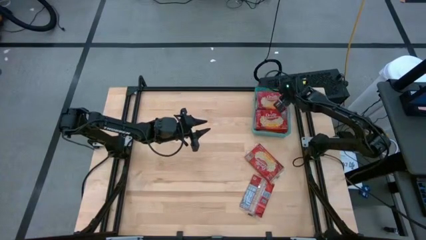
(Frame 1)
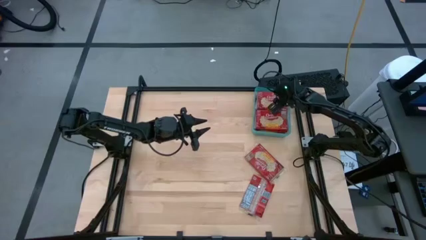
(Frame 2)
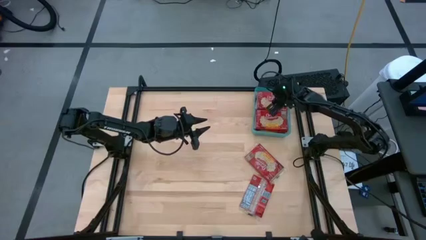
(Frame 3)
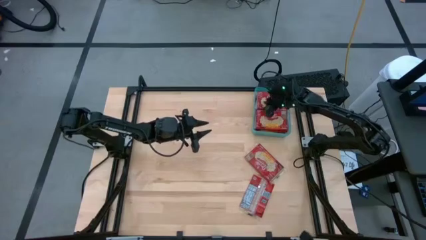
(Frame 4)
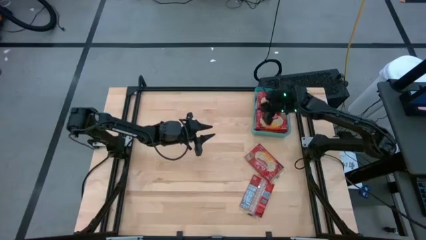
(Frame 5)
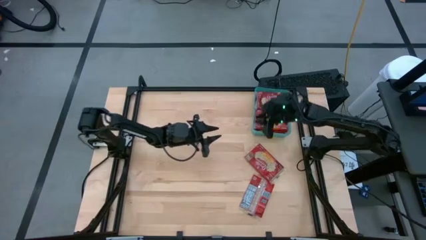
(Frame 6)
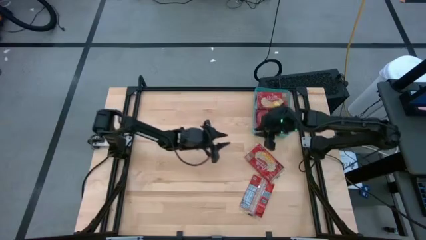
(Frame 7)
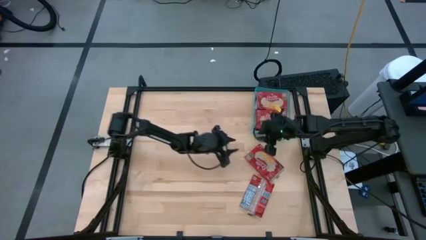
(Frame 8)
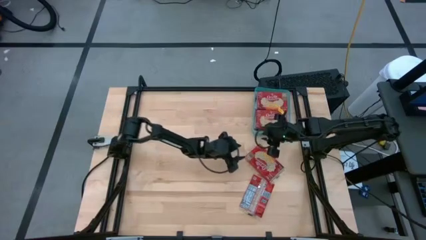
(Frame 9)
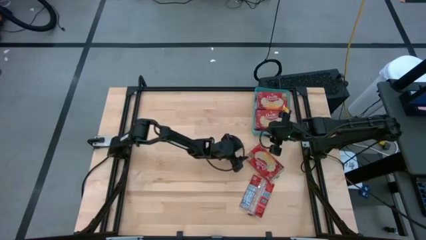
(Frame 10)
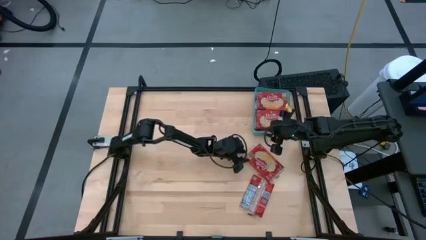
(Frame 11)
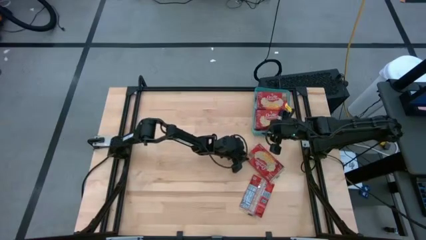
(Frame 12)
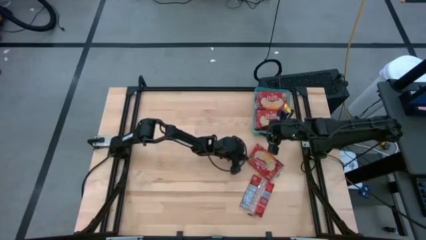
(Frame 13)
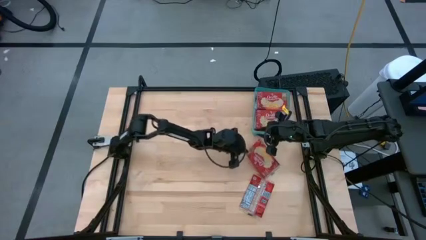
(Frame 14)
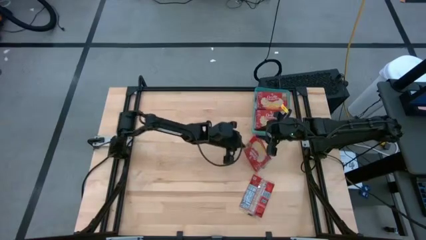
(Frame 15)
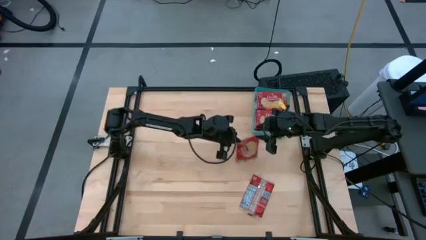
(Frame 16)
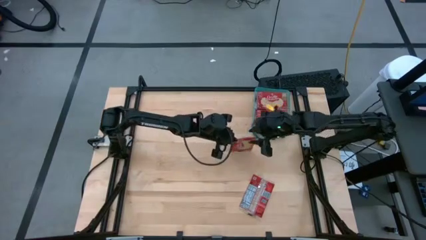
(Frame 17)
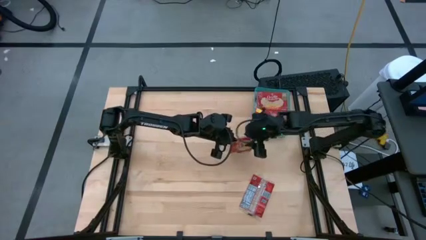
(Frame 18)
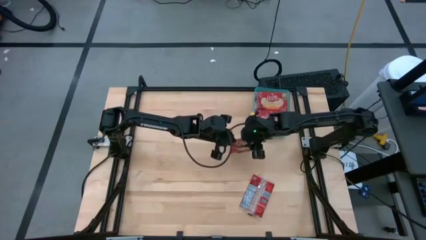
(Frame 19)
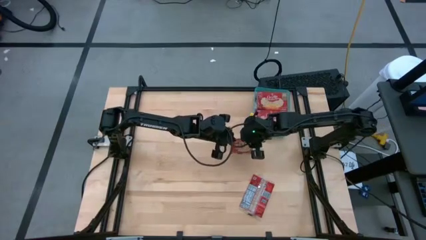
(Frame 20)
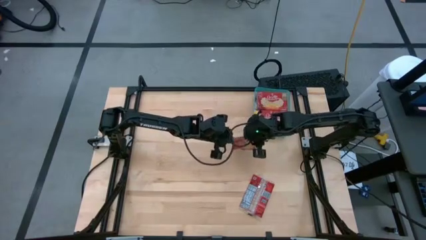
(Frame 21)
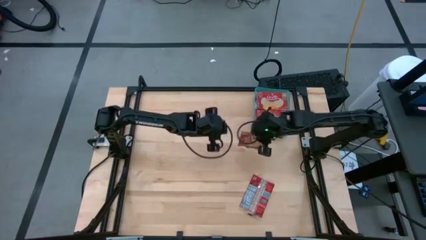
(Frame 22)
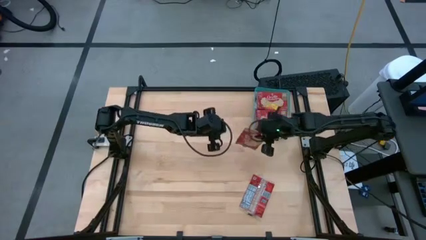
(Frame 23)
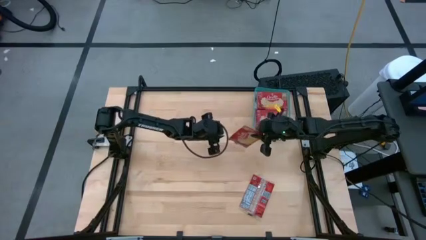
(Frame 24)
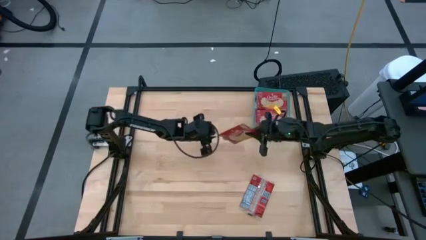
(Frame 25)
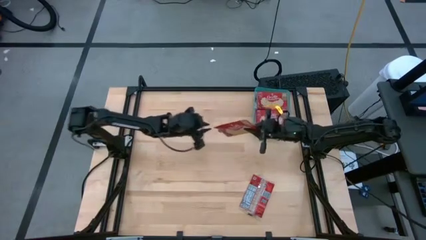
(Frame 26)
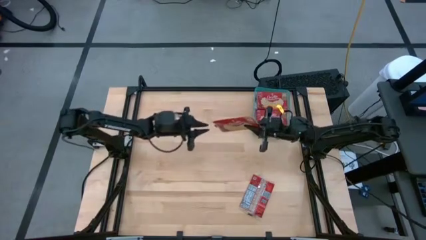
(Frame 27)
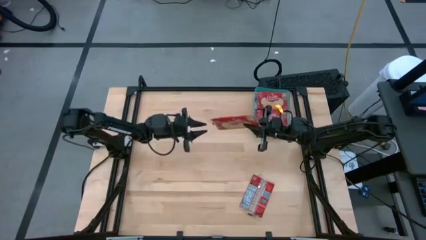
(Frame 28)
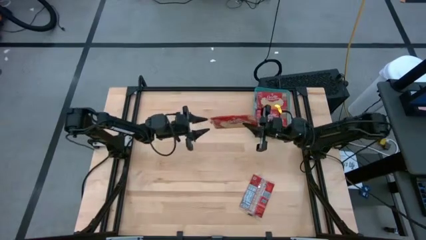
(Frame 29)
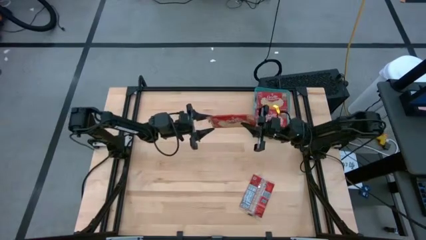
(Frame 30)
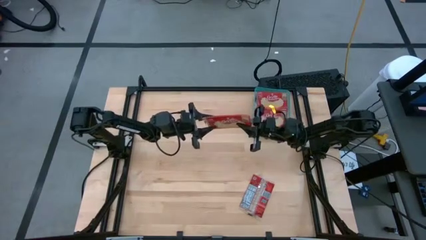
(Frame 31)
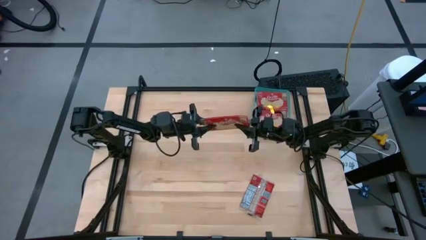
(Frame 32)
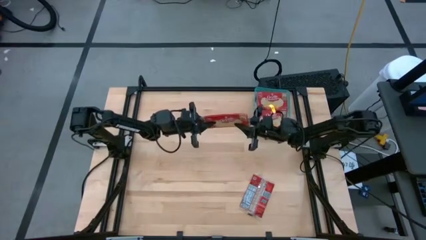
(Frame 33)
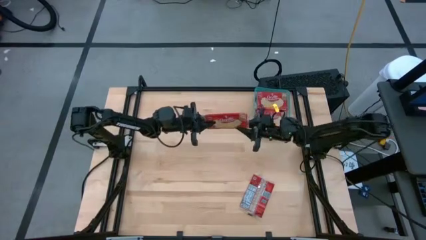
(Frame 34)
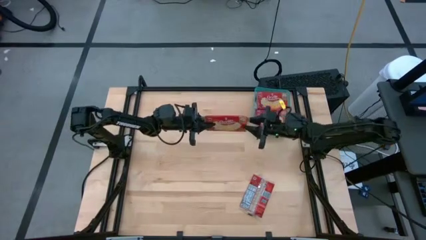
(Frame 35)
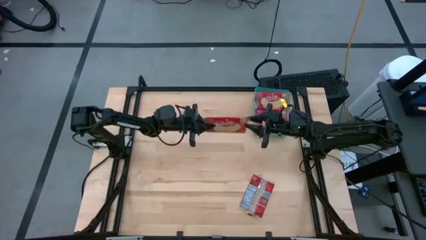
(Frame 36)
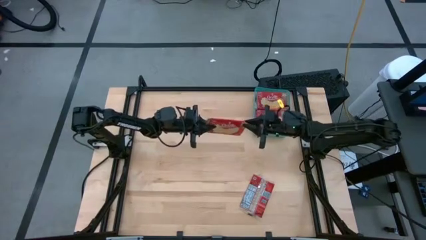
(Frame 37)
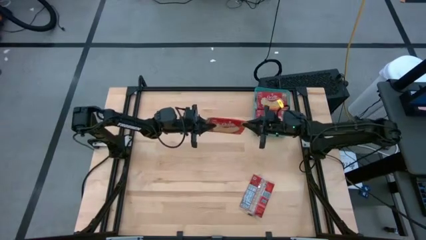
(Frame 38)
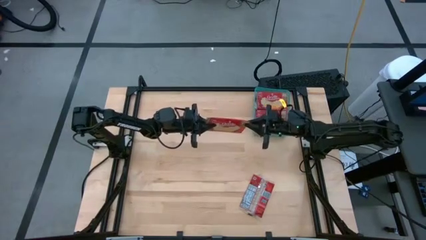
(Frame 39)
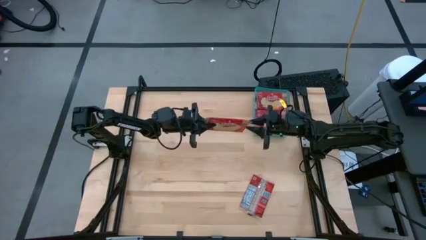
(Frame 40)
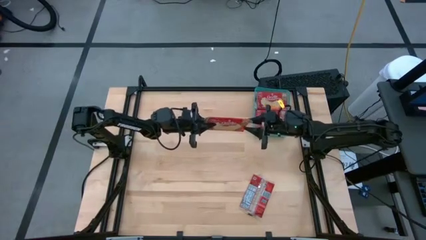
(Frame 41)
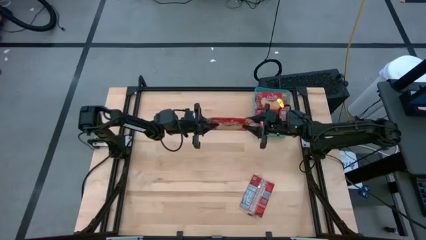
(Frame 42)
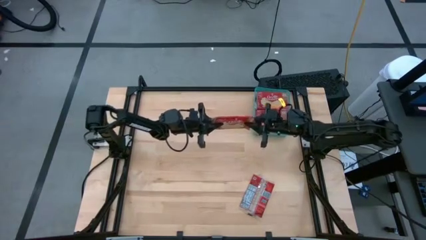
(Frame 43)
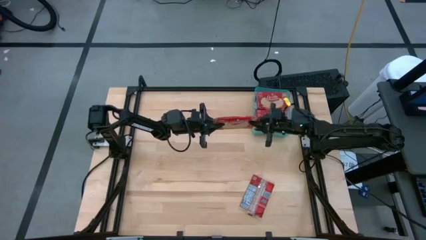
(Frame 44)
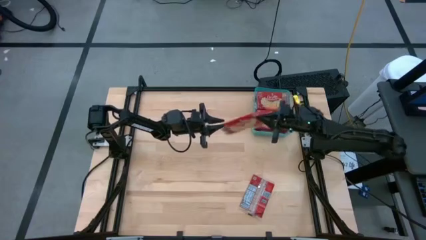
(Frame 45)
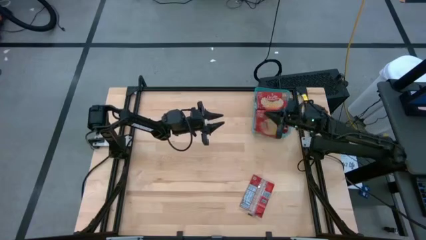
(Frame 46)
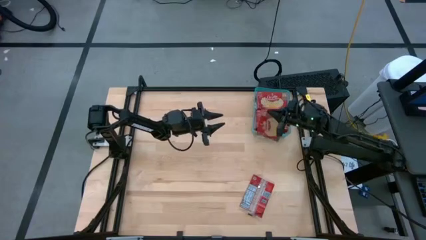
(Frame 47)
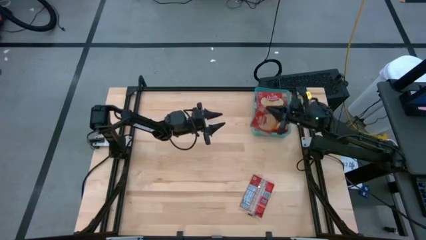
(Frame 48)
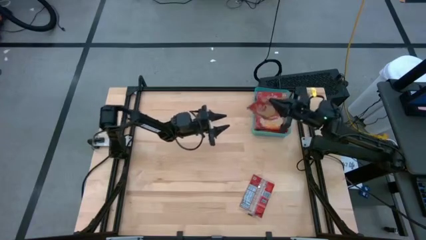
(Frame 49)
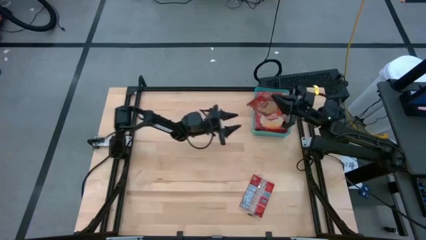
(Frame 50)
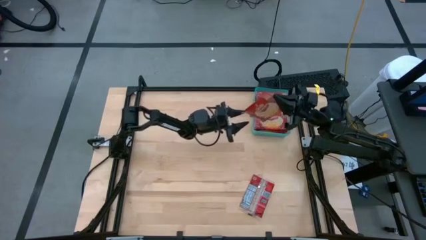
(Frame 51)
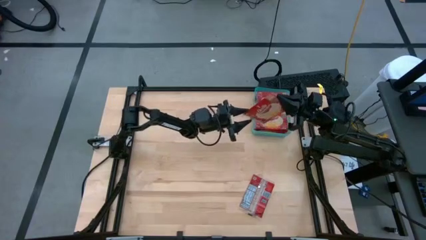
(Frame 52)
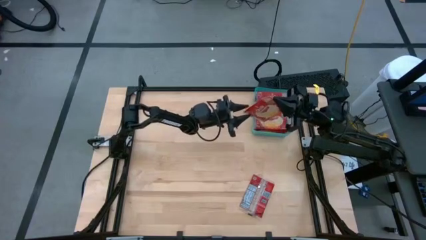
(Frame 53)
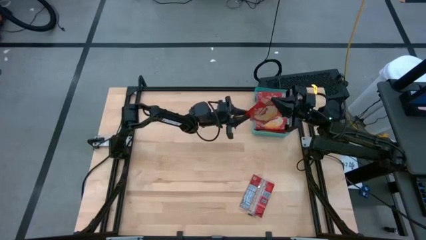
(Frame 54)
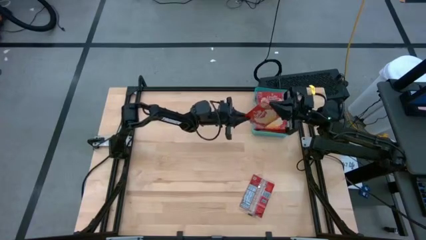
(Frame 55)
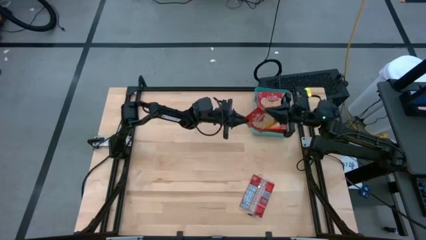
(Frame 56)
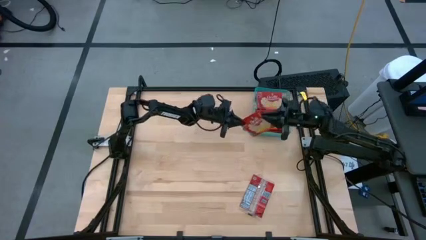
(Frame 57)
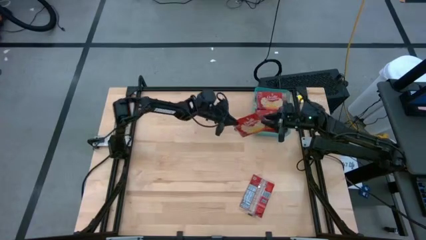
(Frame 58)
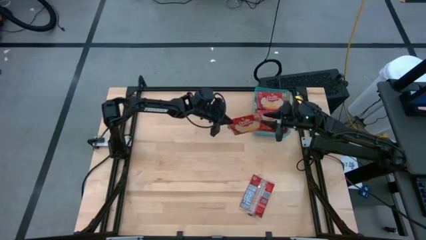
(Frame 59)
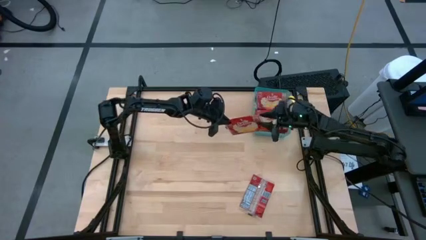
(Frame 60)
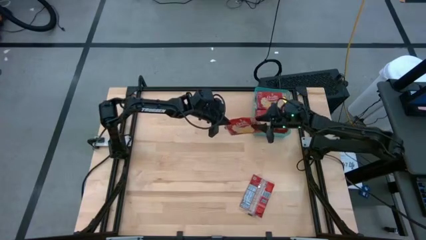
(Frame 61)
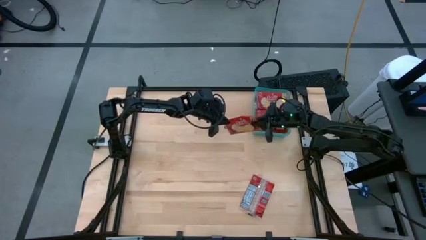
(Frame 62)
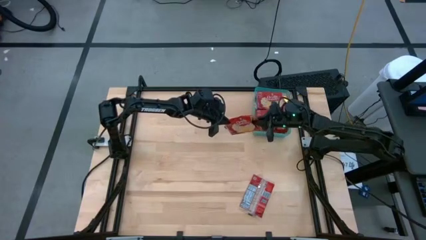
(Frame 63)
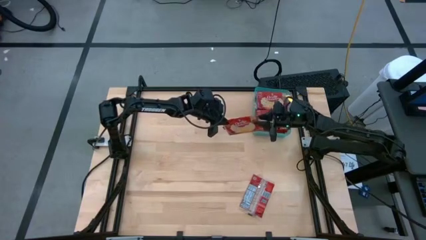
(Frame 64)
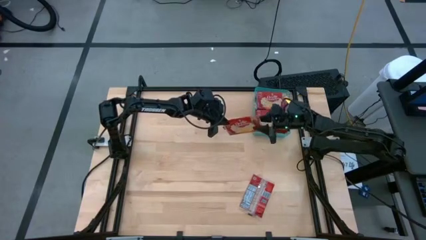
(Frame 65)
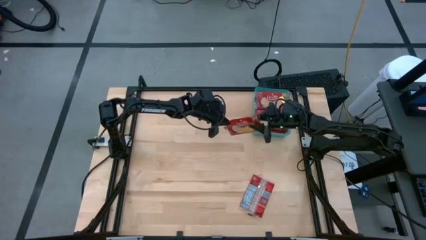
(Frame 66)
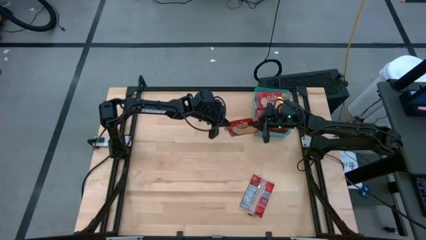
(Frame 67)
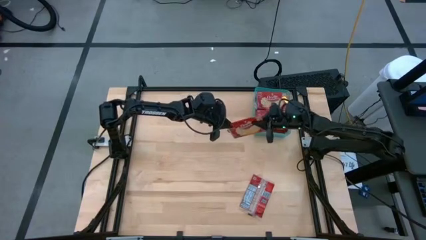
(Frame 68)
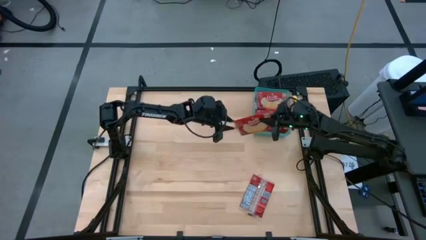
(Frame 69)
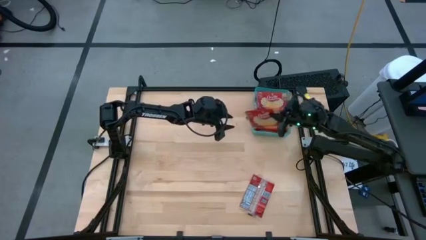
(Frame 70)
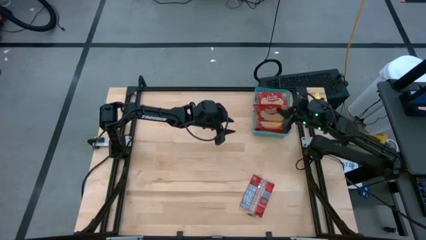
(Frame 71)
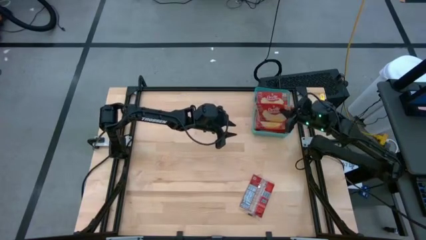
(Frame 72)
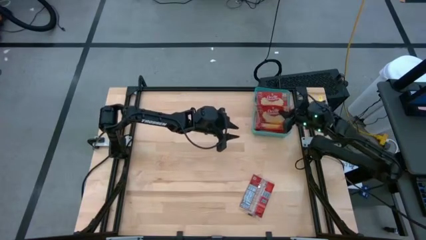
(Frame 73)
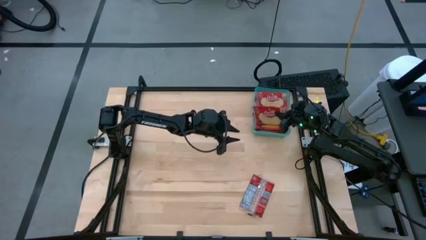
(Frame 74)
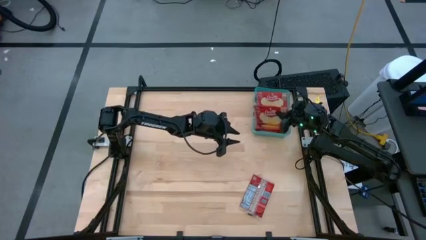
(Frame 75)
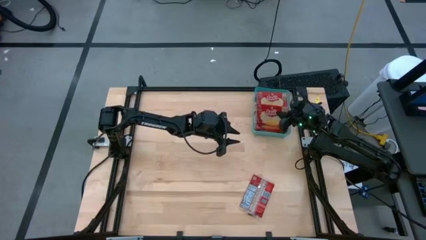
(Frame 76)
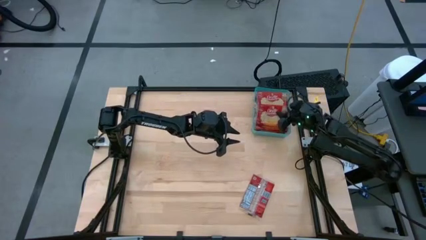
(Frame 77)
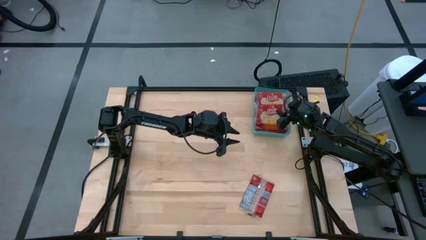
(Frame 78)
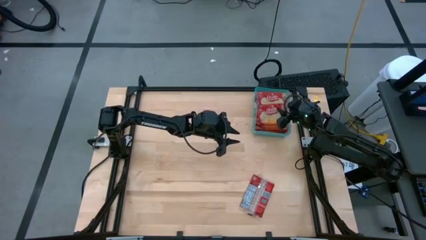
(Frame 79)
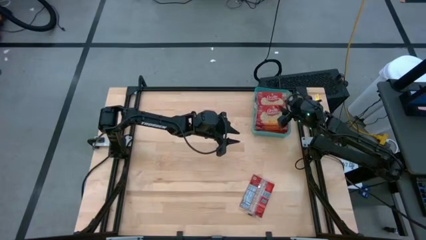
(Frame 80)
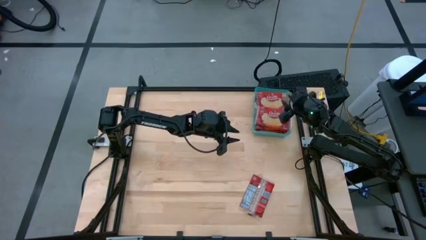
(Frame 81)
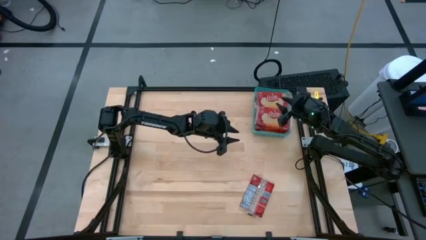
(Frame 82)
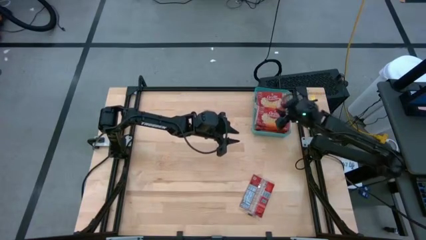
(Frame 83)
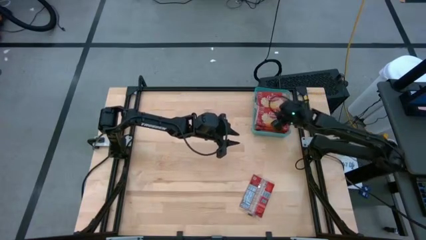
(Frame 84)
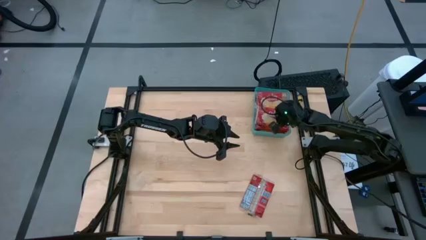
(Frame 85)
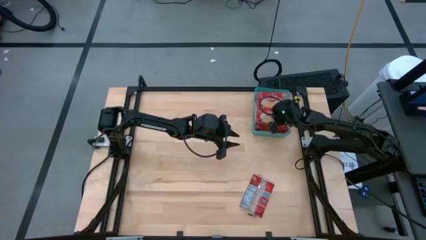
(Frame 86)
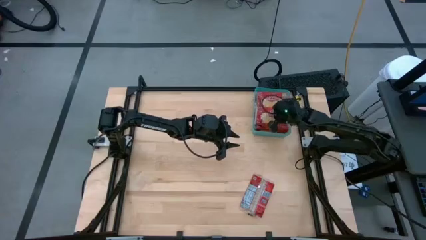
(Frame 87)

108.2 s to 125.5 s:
Task: Sort popcorn bags into baskets
Put the top red popcorn bag into the green bin
